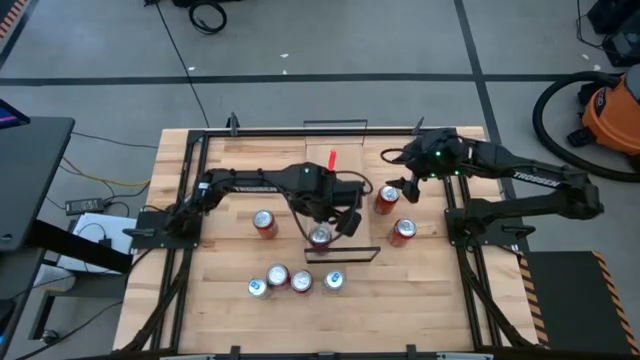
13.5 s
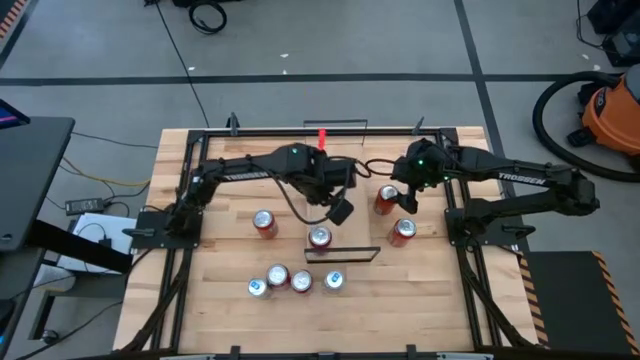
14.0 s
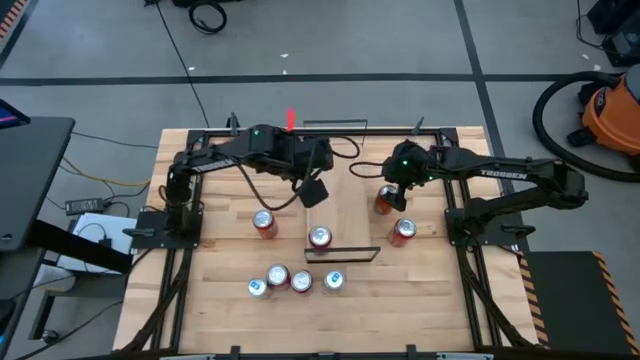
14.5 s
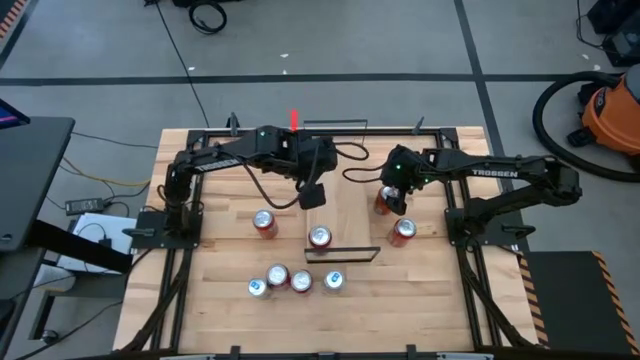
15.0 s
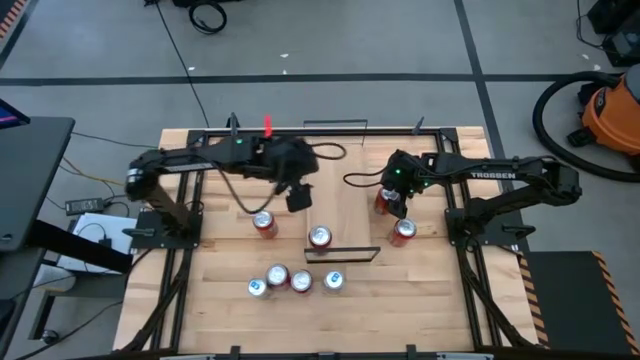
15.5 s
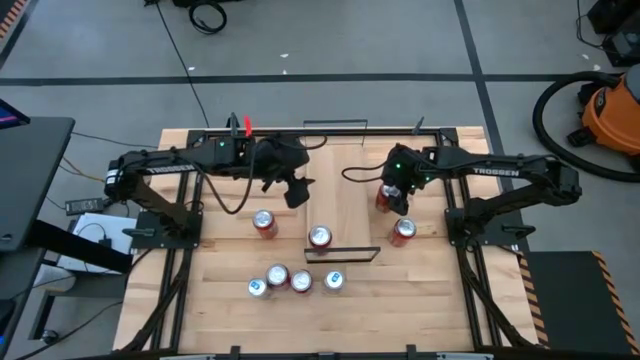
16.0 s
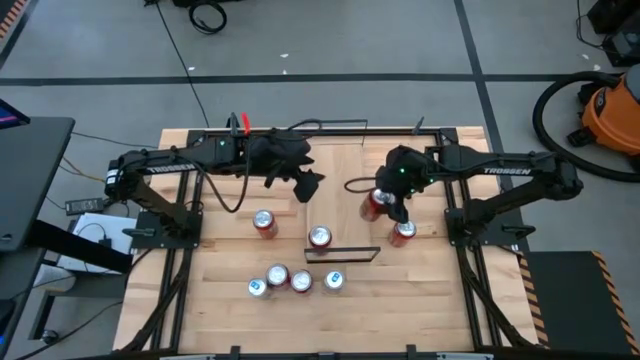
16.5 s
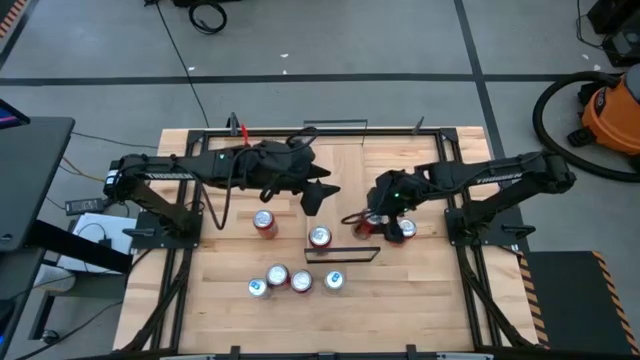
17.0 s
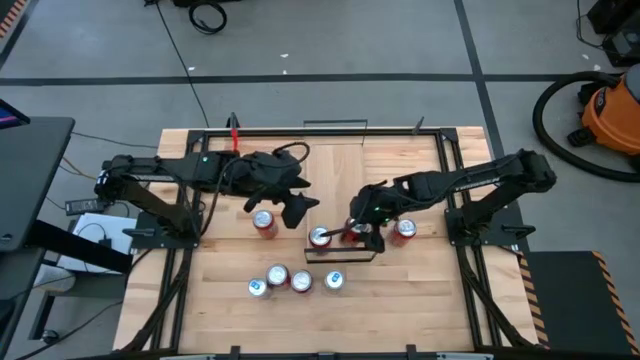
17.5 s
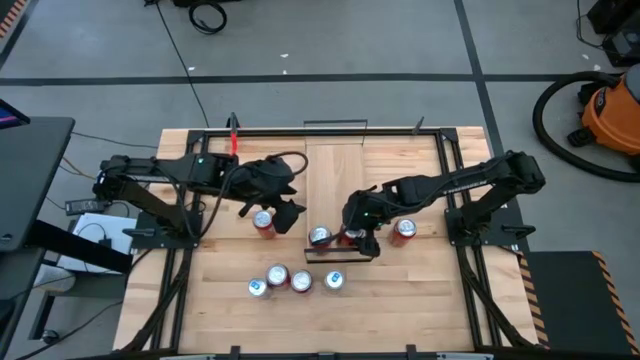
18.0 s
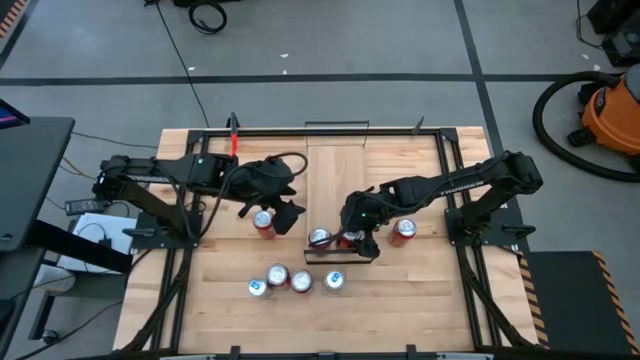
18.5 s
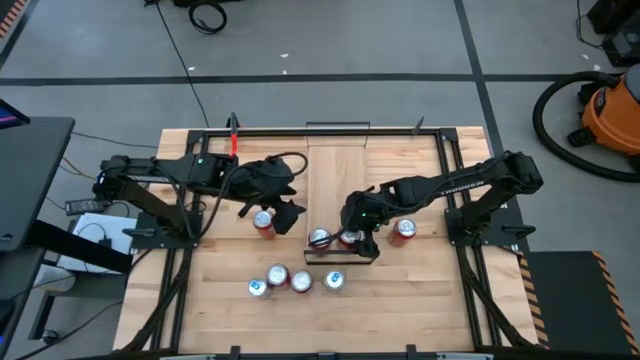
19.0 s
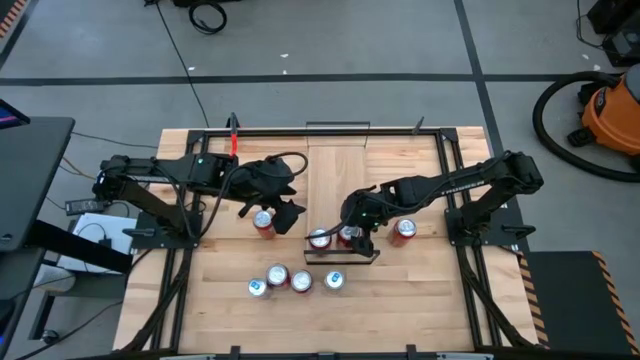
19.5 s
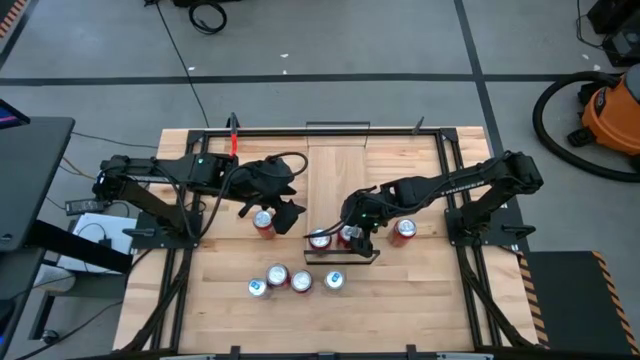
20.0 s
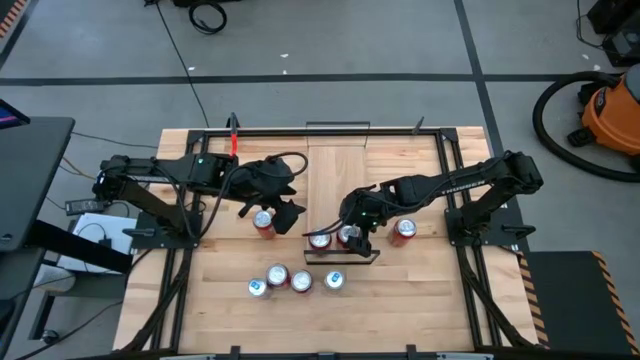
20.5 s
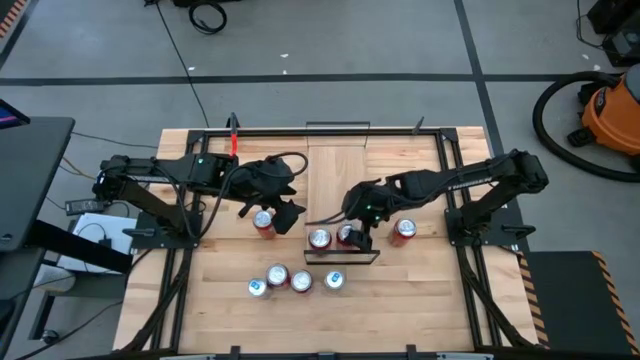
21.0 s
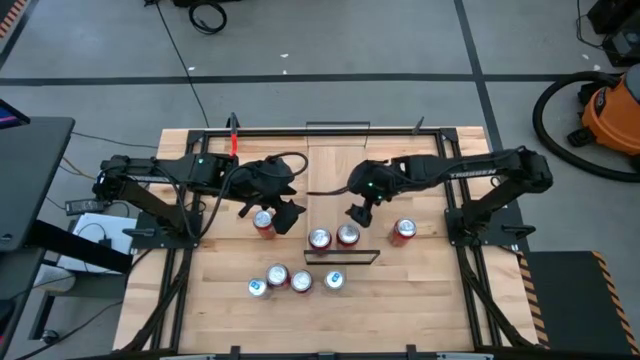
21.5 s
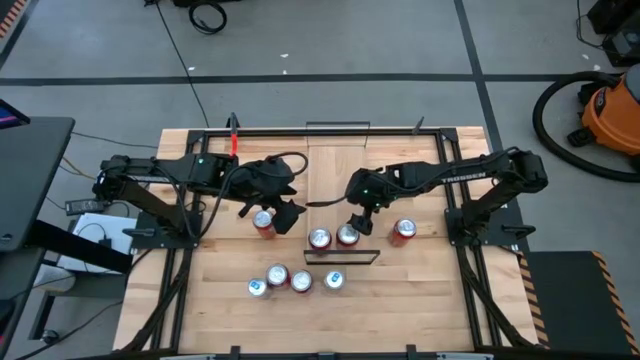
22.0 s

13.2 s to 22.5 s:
Task: Place canned beverage on shelf
Put the red black soda can on the shelf aligned with the other red black soda can

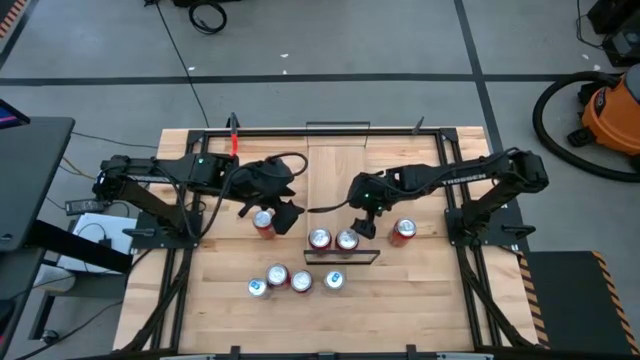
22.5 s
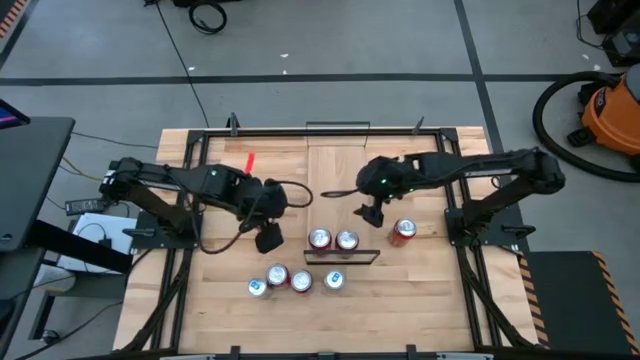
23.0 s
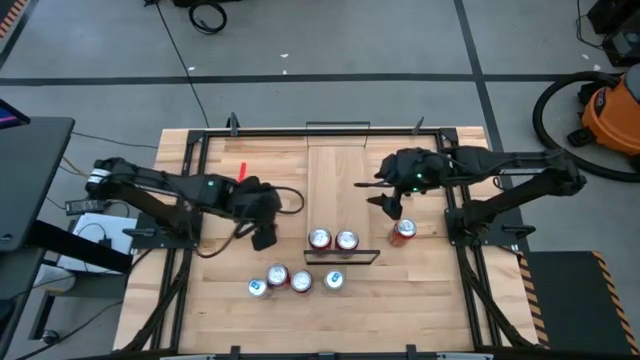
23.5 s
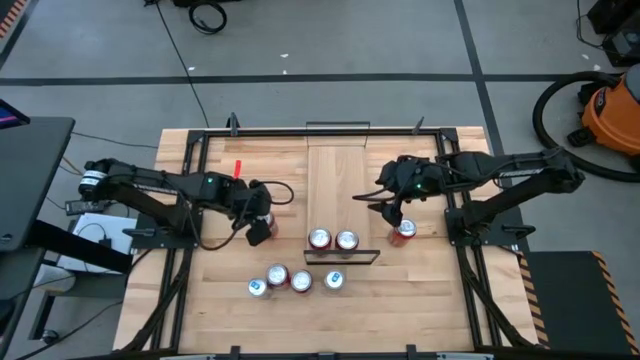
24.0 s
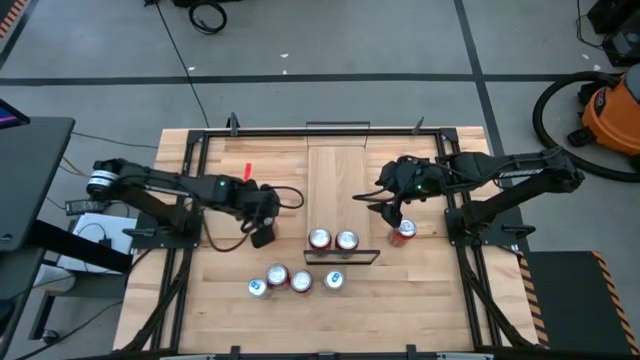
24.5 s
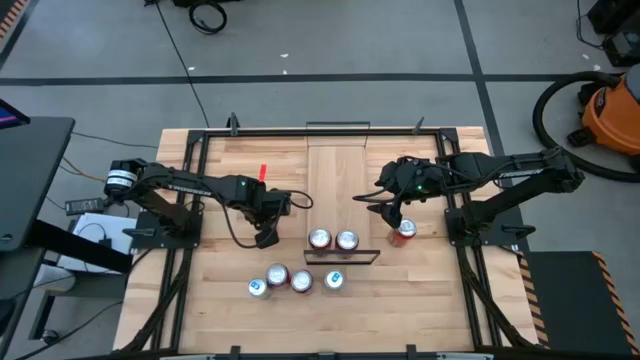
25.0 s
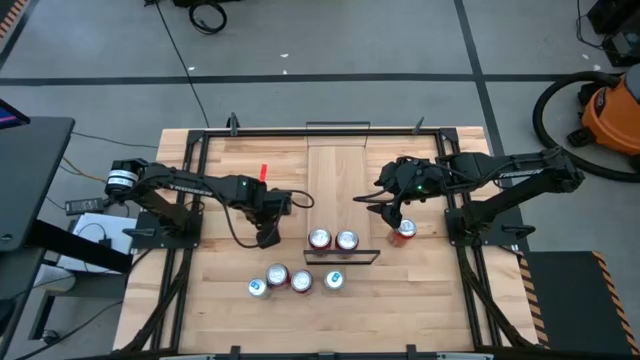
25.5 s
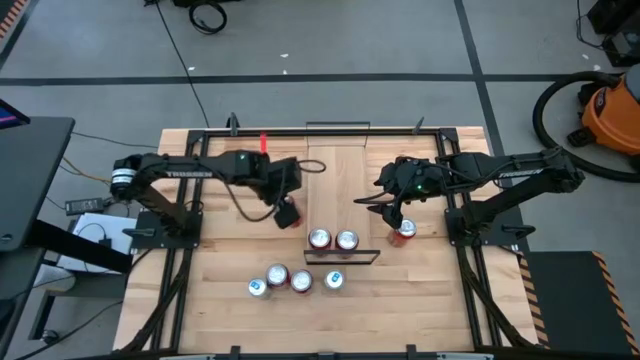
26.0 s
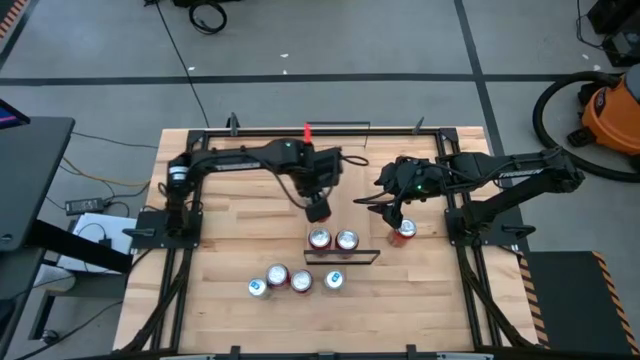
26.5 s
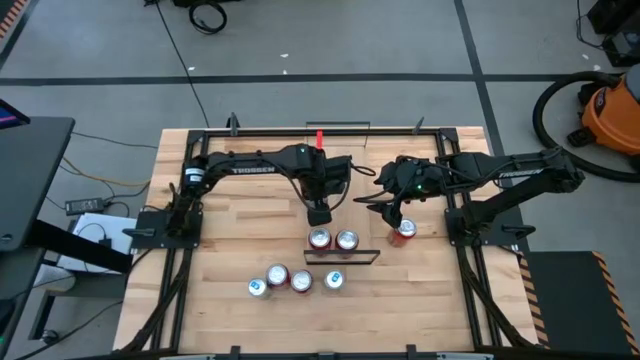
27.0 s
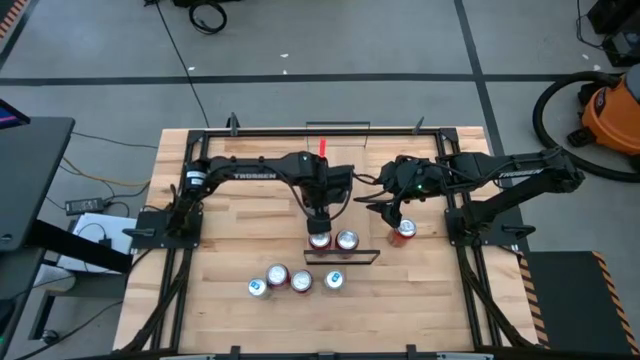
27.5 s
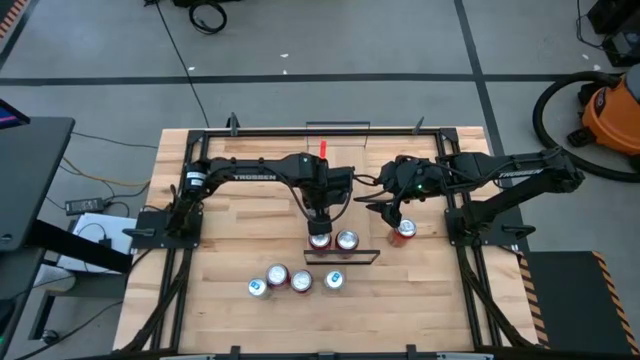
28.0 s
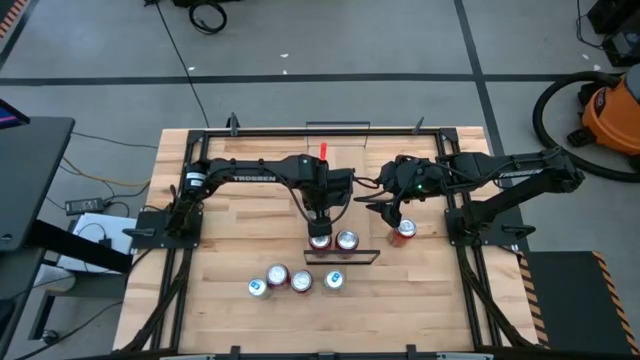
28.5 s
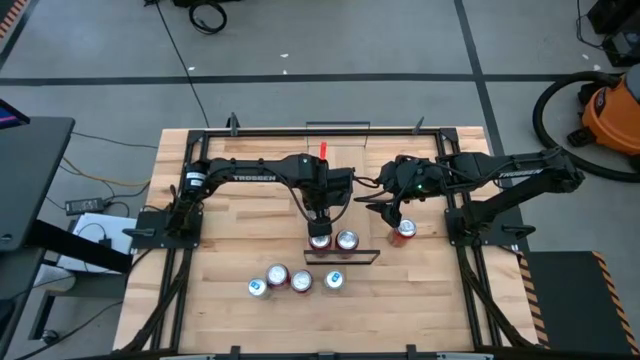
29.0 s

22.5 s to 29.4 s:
Put the left red soda can on the shelf

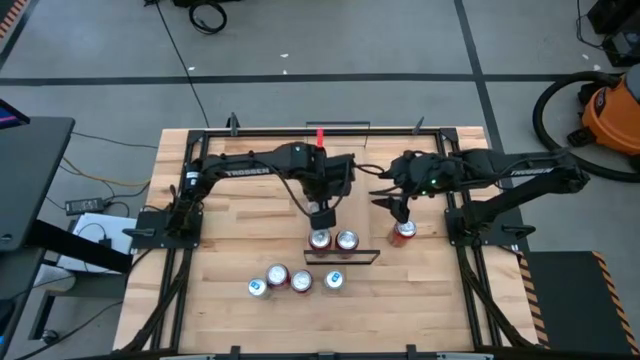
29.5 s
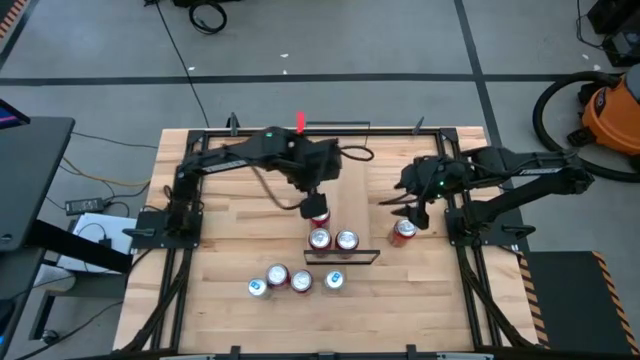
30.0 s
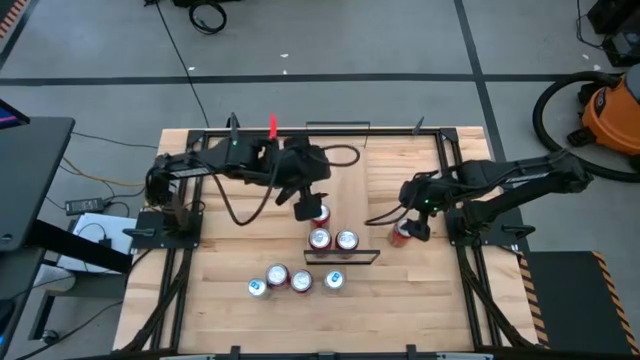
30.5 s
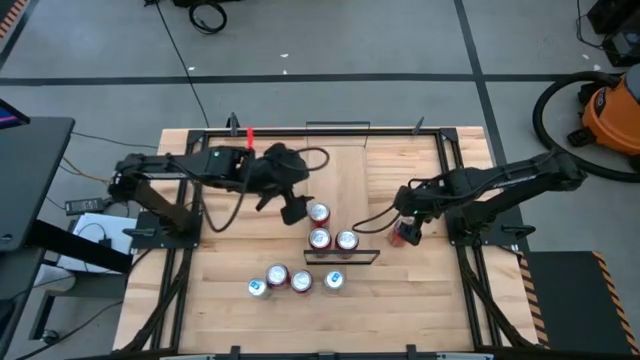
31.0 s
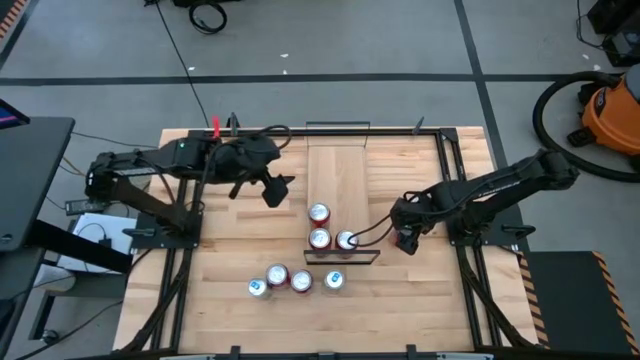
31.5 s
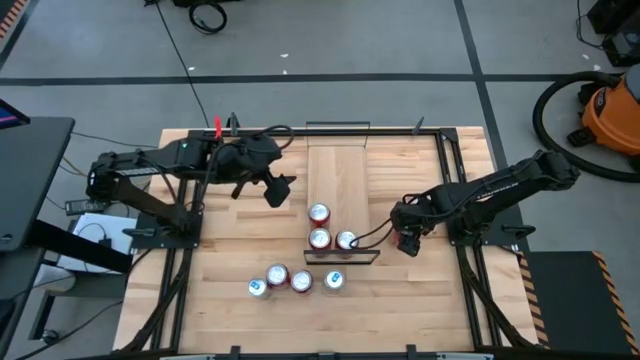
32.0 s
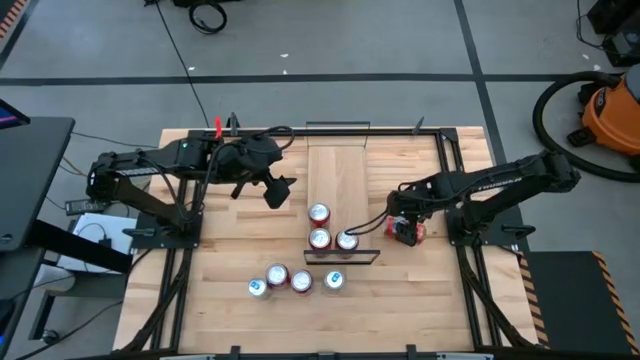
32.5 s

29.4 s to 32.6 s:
Put the red soda can on the shelf aligned with the other red soda can

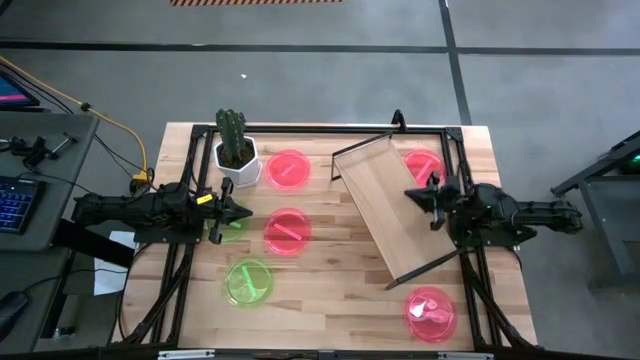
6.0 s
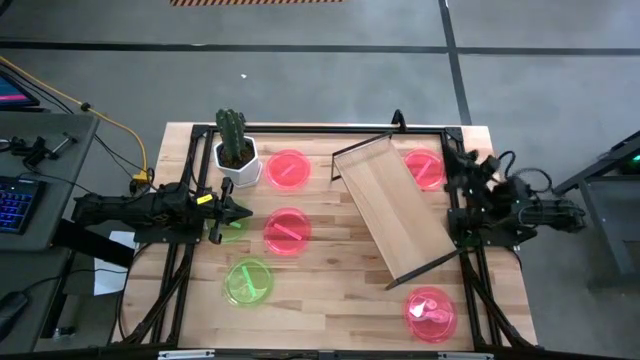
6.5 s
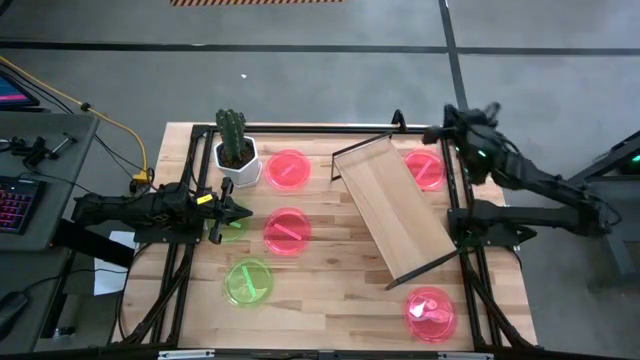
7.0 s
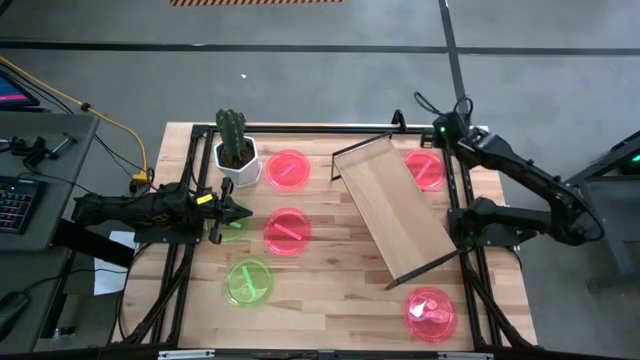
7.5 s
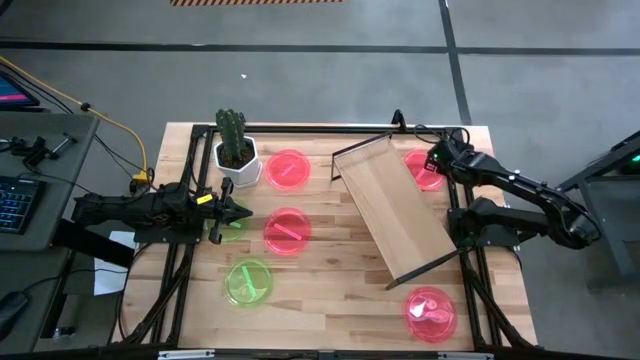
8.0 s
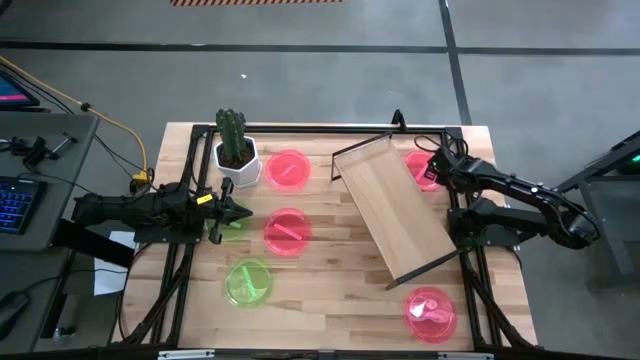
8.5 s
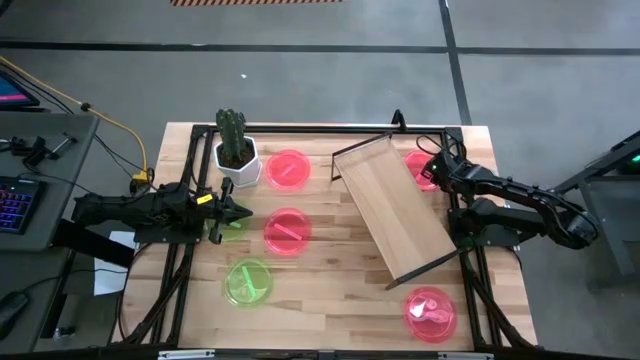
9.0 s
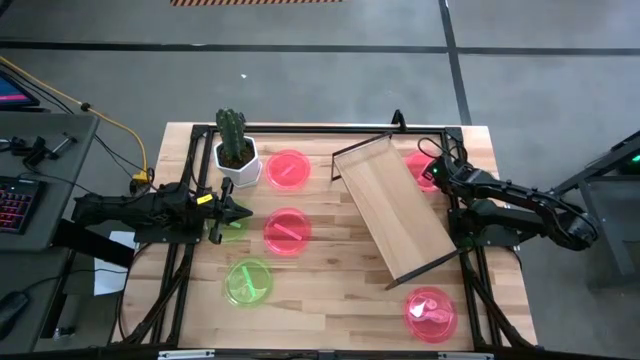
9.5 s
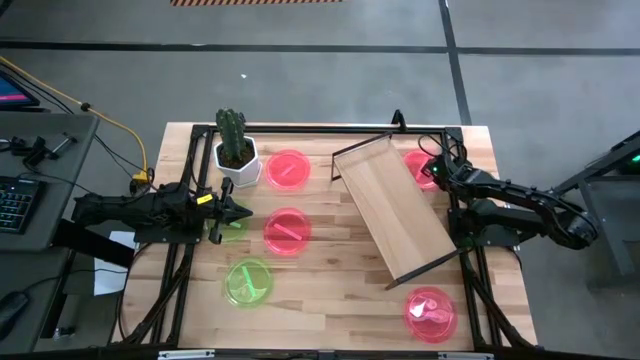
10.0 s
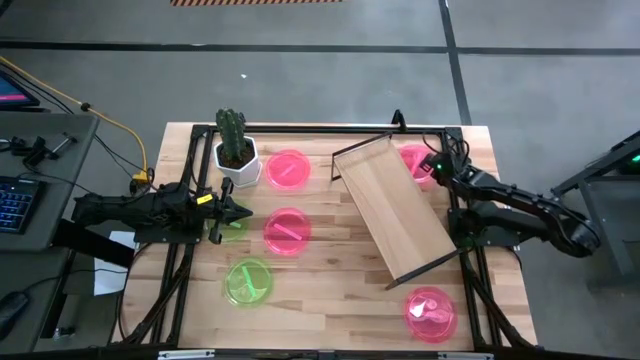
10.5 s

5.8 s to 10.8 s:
Task: Place and stack plates onto a shelf
Put the pink plate on the shelf
